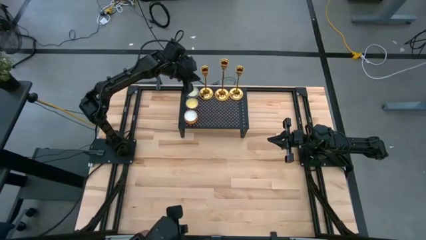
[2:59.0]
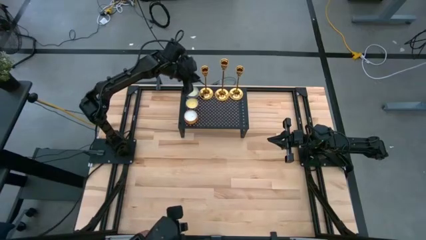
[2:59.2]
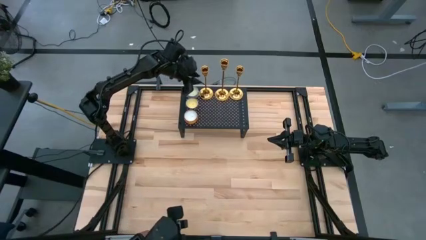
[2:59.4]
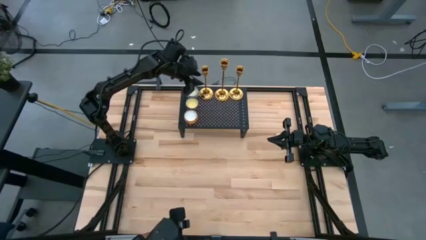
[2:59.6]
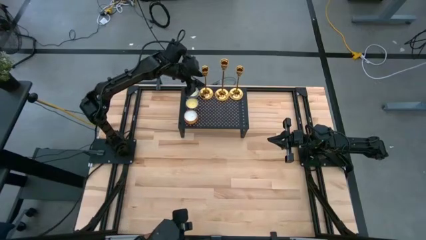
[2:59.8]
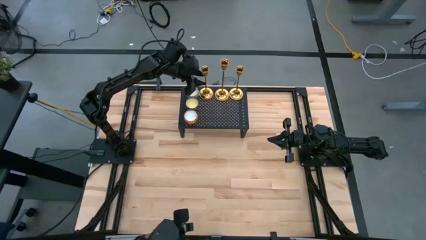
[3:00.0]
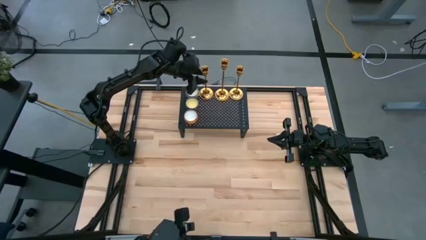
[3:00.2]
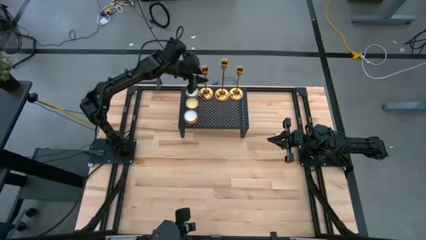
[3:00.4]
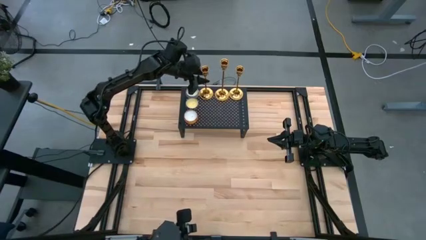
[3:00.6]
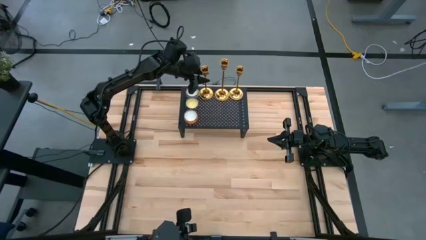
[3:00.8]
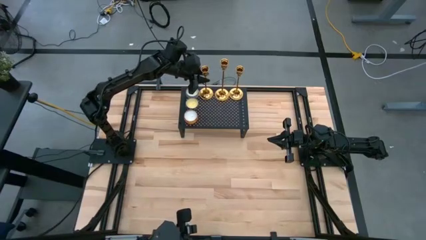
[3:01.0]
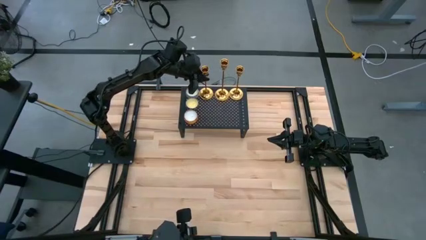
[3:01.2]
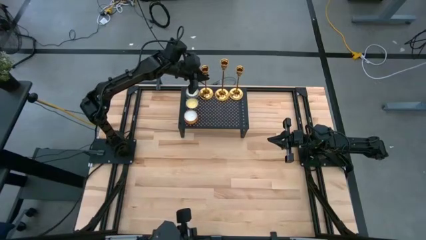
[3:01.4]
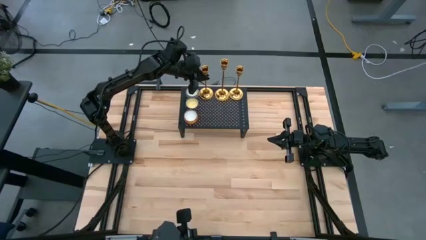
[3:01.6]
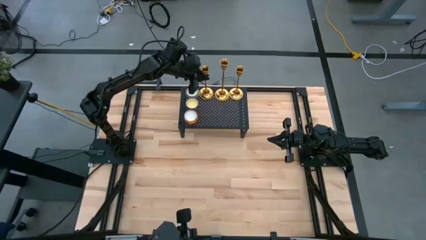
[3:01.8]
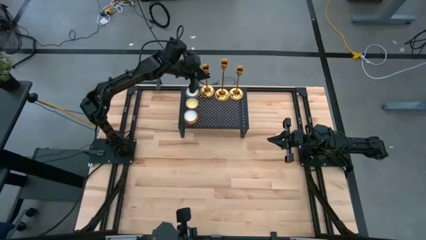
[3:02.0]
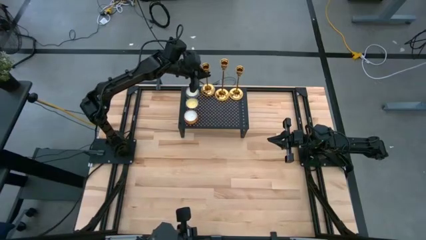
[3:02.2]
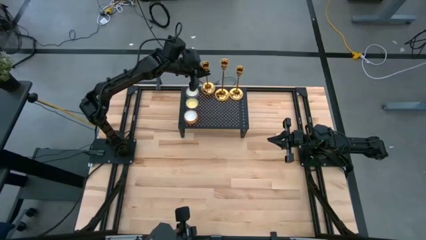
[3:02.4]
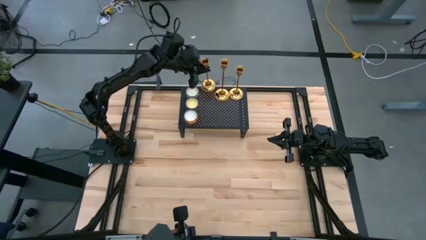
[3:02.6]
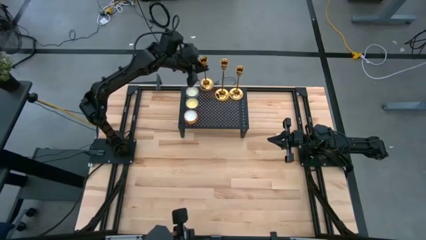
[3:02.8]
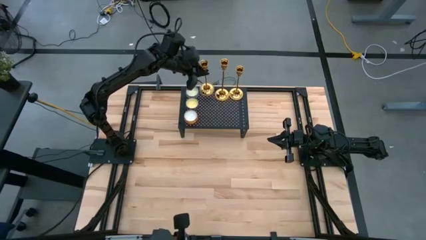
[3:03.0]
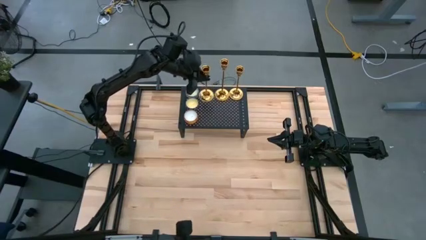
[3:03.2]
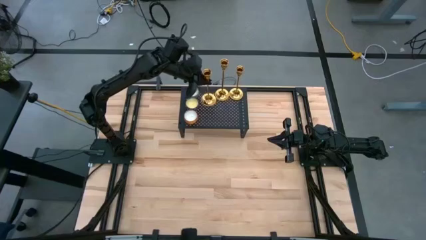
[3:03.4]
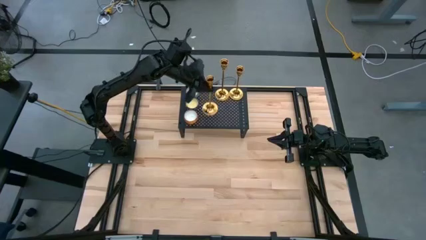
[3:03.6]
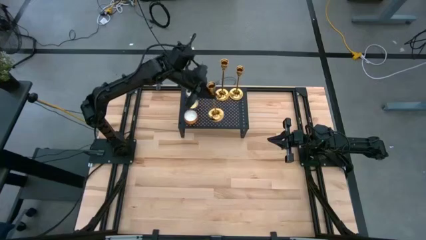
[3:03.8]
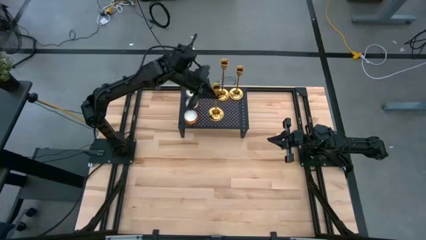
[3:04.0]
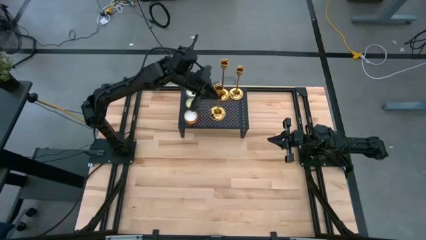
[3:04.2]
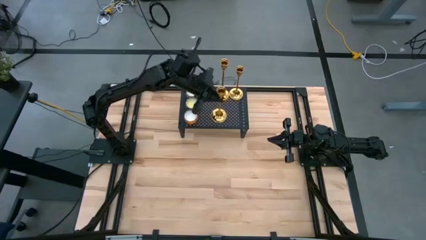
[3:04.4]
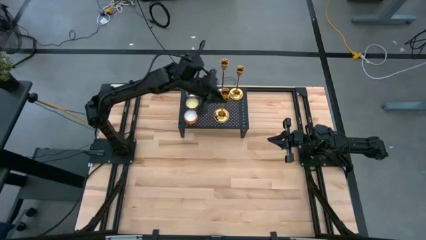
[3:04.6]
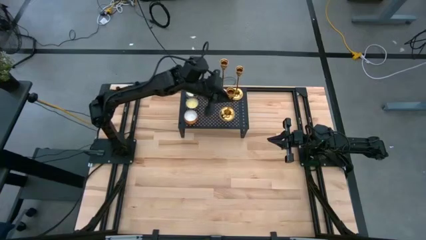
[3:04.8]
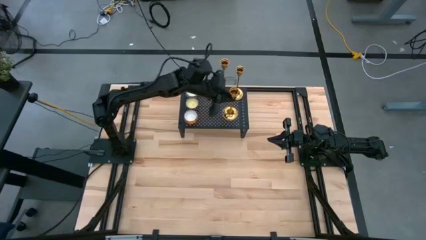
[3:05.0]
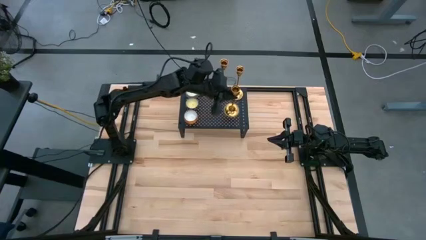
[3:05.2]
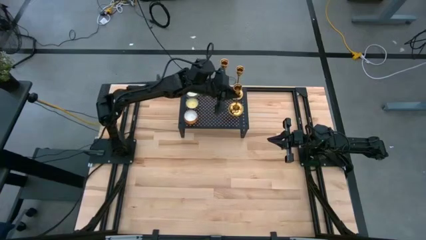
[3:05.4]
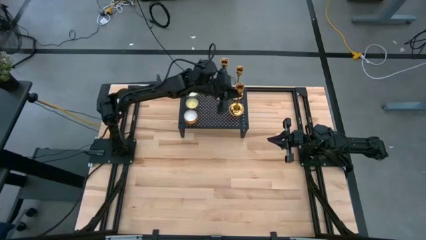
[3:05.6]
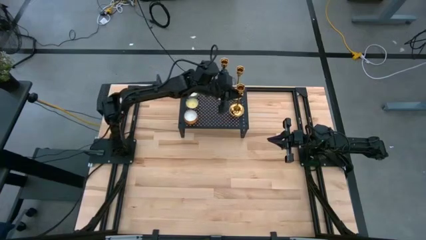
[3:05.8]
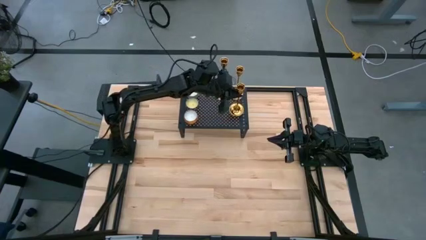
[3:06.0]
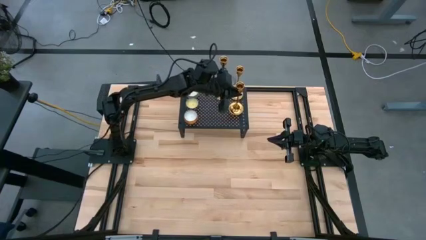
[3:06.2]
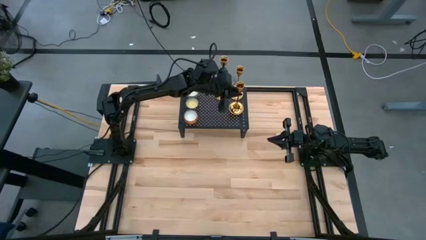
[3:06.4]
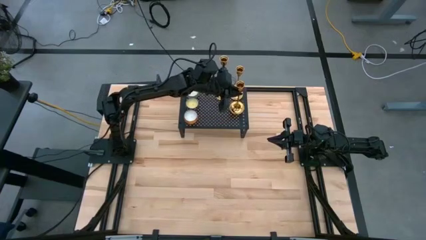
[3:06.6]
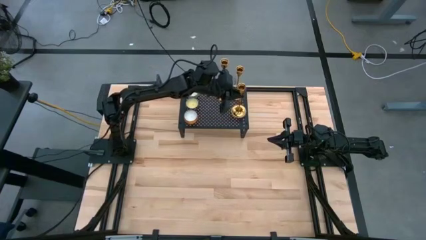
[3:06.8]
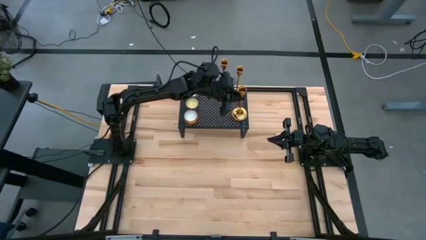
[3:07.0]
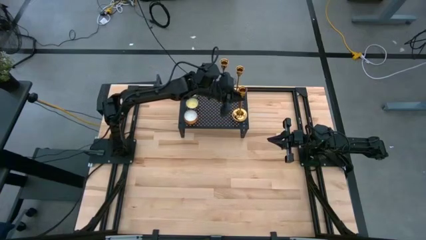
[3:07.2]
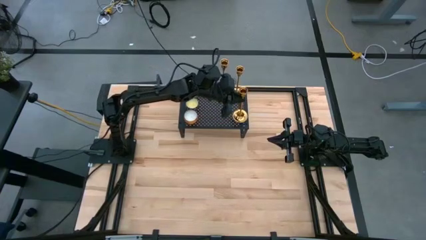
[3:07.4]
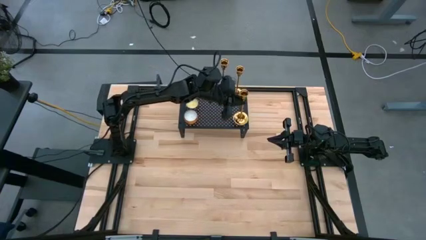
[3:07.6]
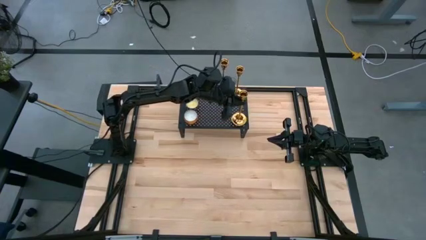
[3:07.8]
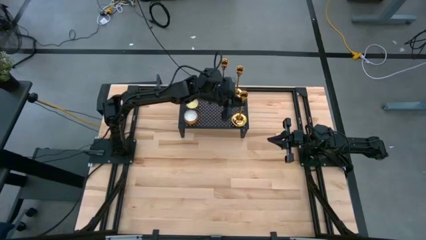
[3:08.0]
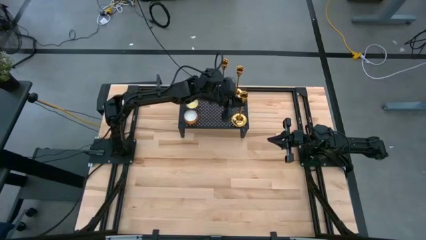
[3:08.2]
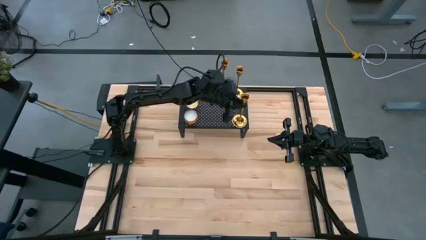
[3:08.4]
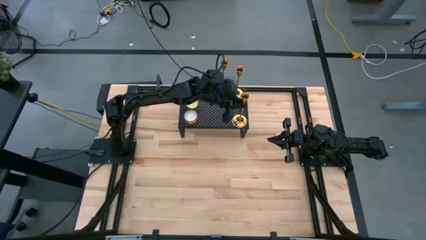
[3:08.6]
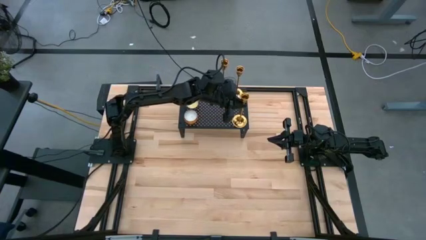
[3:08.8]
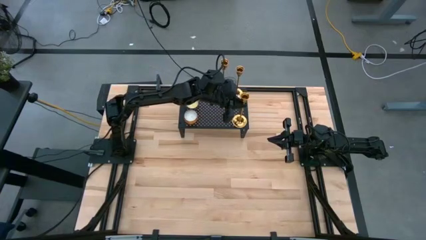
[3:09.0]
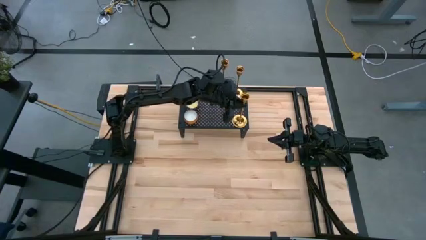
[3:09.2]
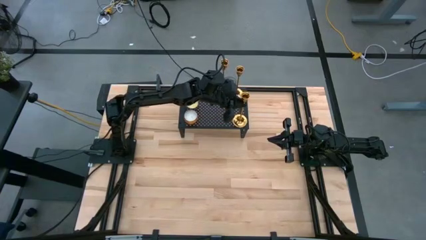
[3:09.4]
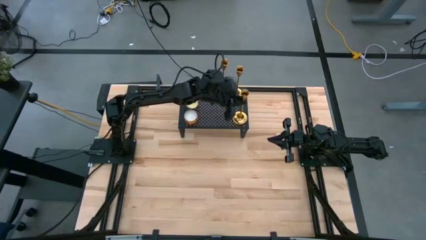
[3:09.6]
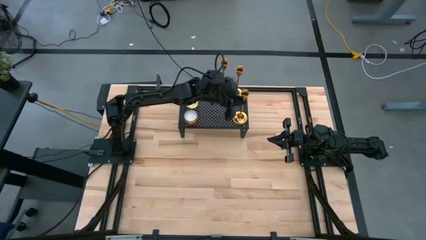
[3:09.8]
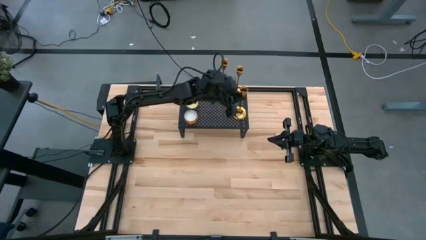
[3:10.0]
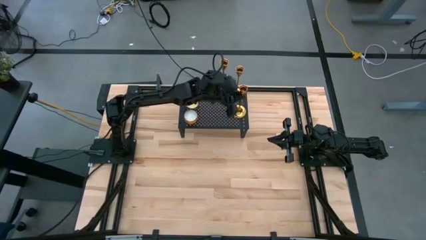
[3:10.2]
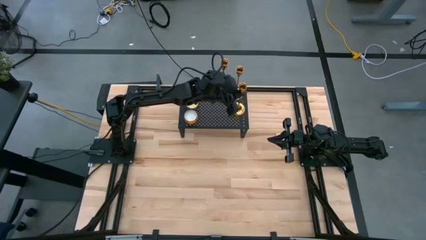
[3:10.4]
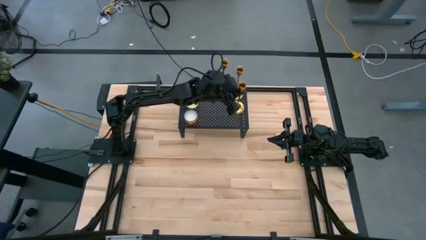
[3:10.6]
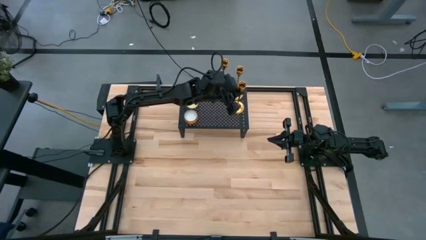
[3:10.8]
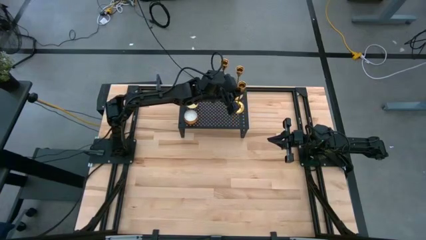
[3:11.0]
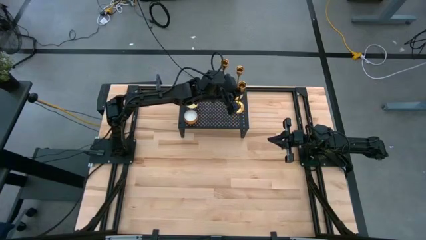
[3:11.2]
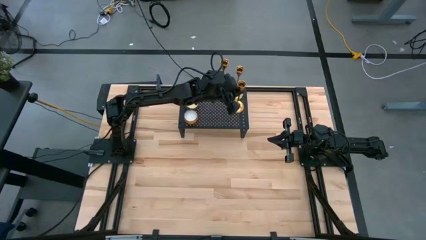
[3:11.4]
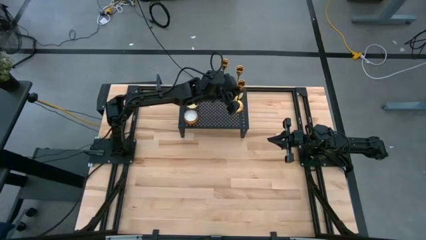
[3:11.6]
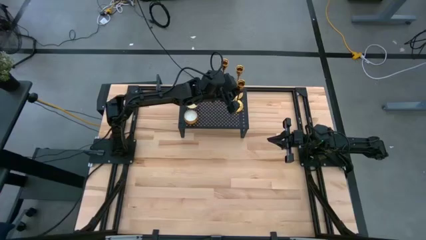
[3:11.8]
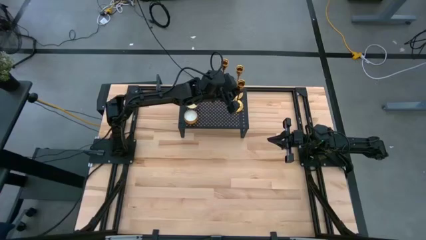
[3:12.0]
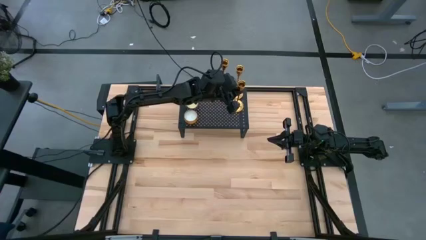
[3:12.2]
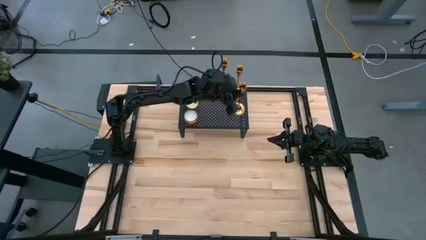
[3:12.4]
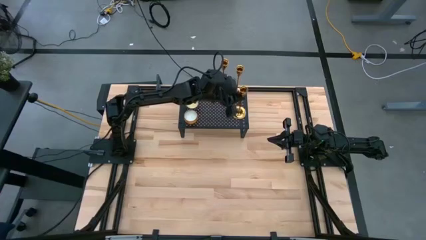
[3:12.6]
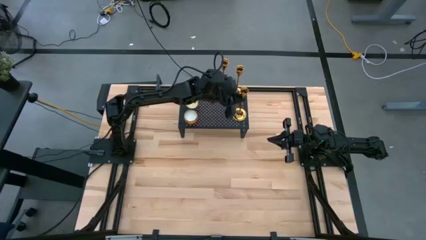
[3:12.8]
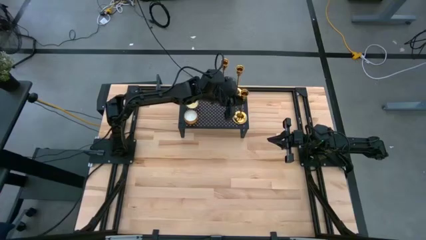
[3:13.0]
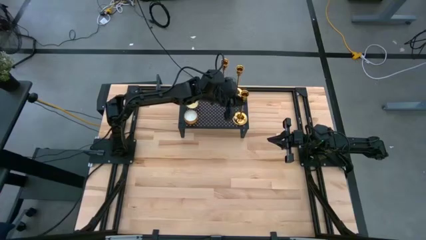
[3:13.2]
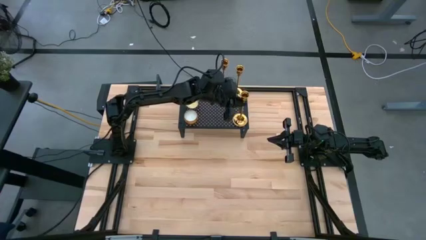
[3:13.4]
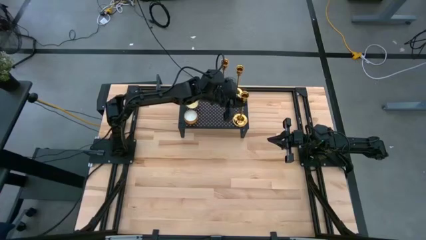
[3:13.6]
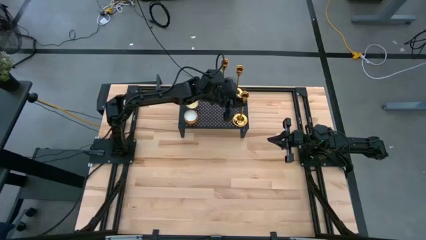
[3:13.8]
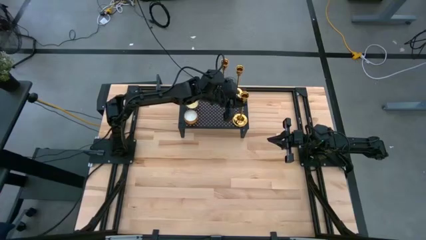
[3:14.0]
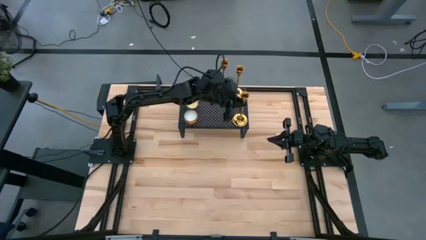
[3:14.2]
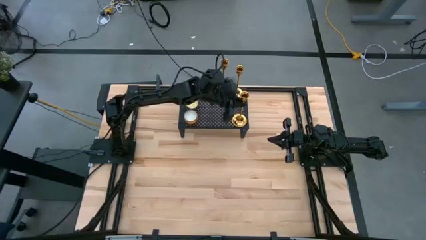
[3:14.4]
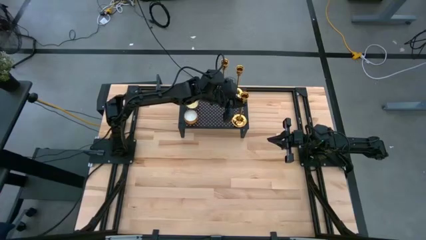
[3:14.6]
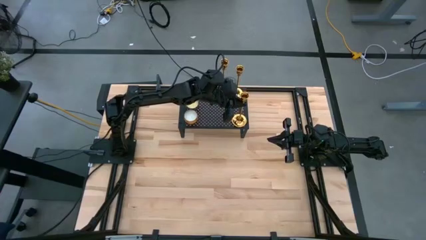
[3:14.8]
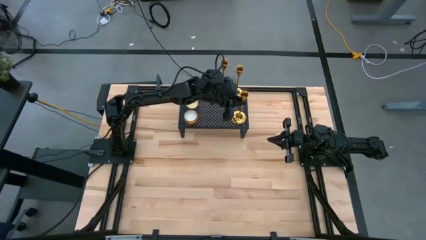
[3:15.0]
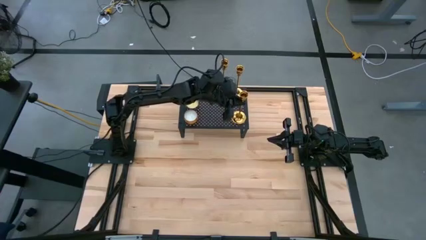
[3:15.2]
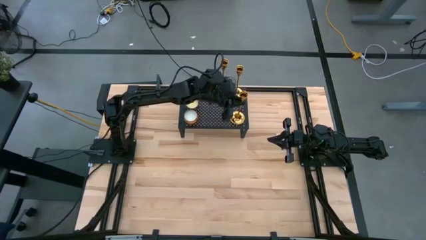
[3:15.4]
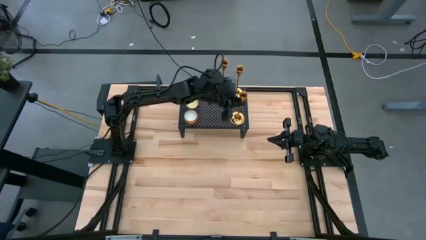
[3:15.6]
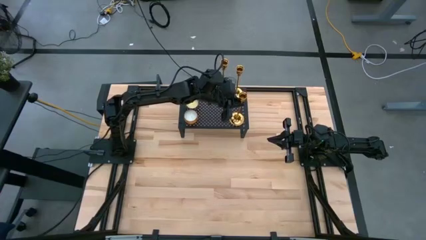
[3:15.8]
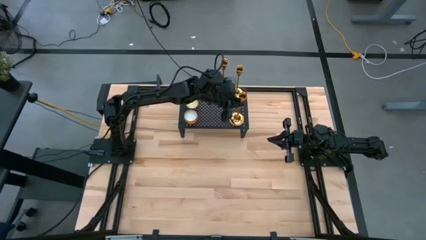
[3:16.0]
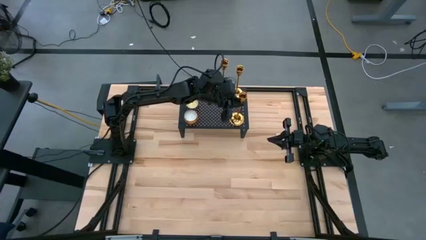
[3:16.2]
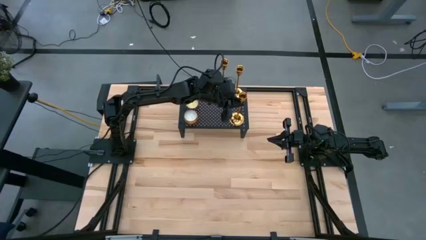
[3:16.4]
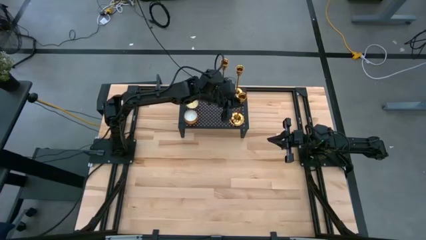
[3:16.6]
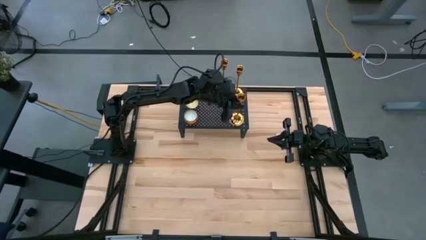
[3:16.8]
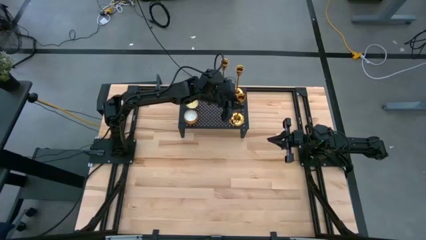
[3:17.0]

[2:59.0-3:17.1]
Task: Pick & Place candle stick holders
Adjust the candle holders on the shelf
